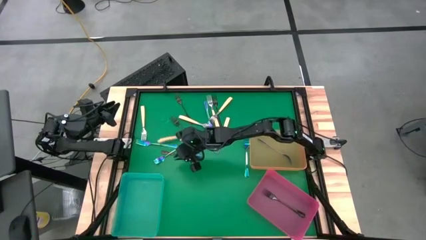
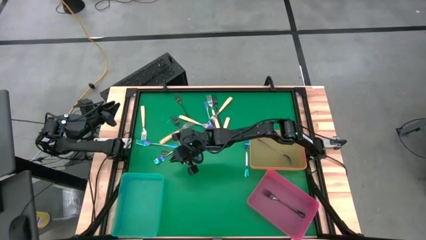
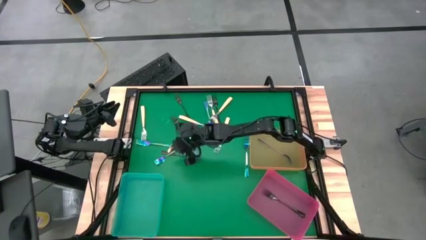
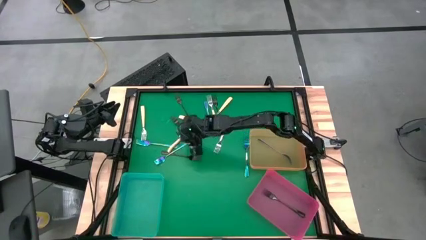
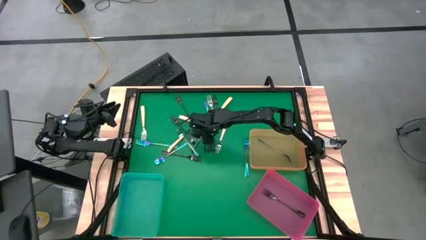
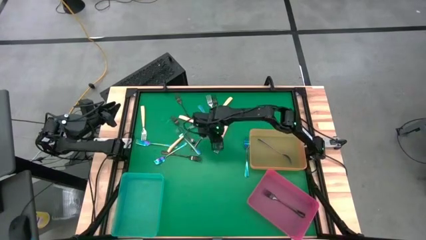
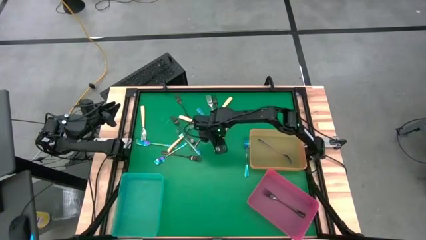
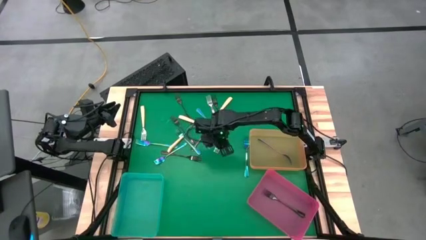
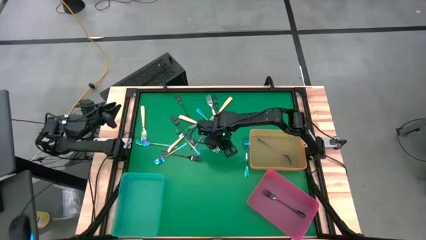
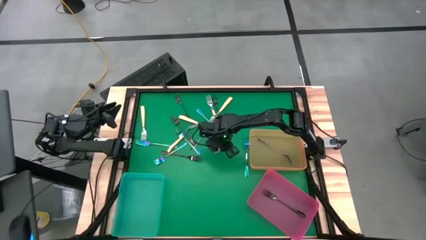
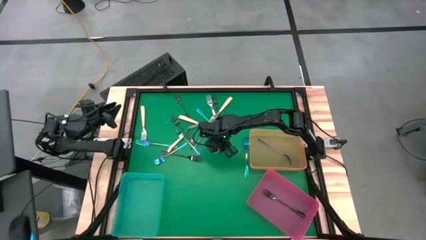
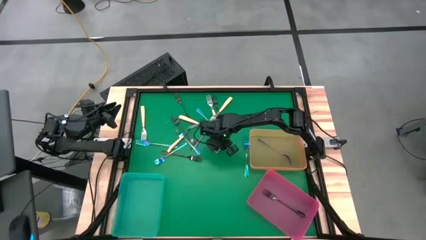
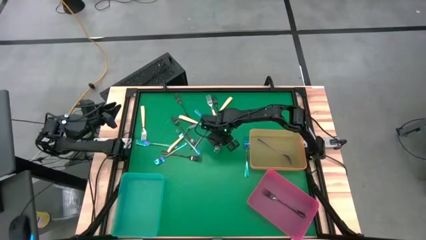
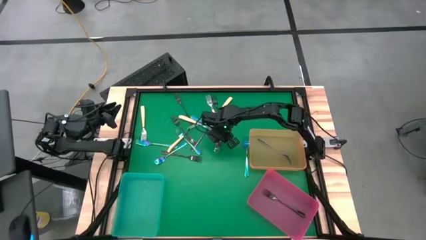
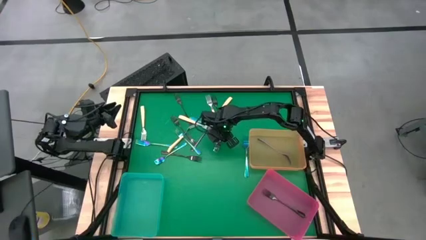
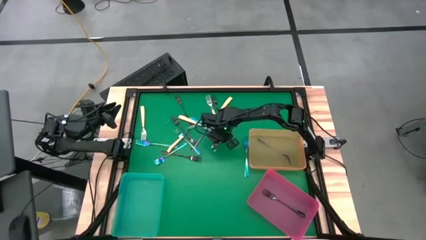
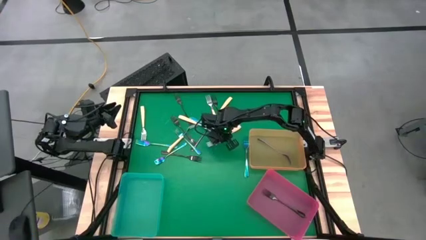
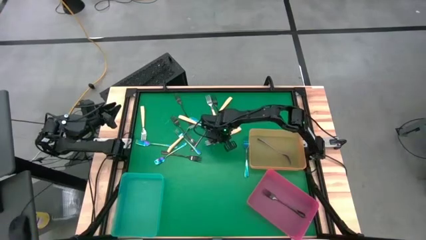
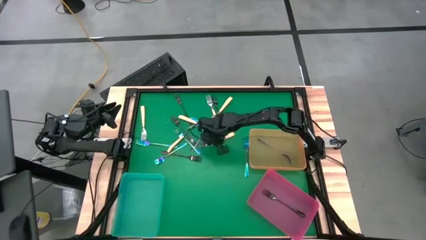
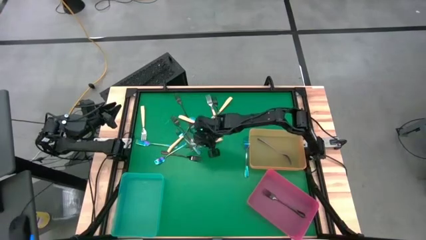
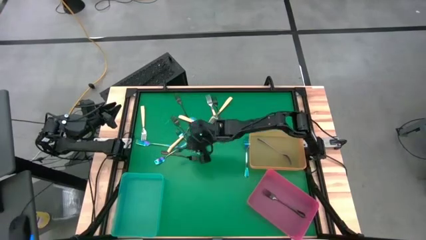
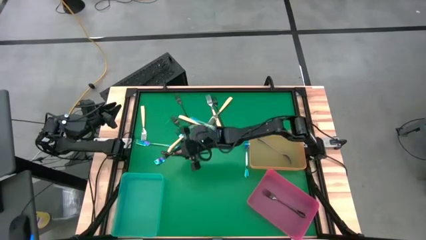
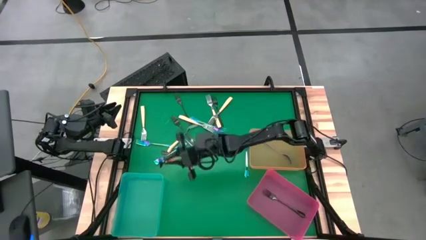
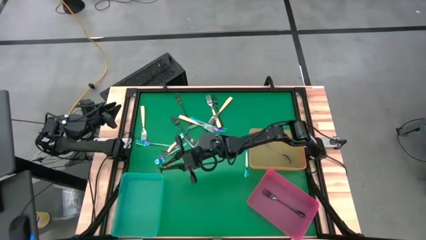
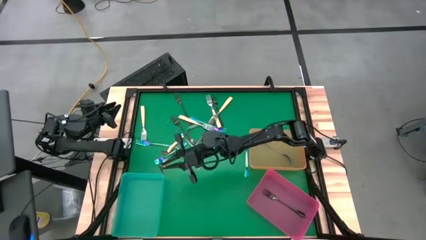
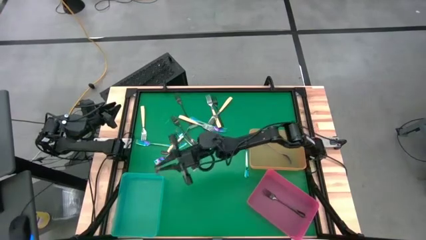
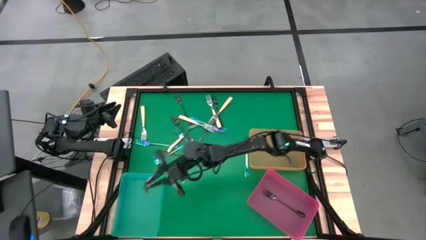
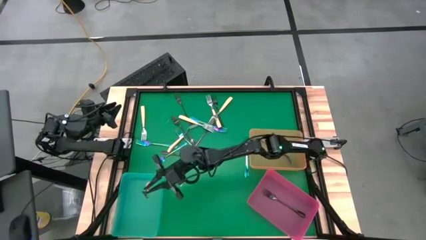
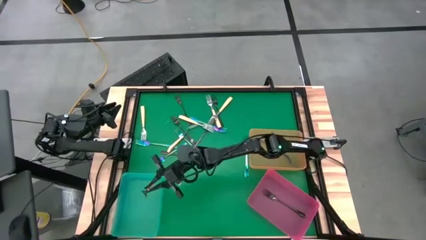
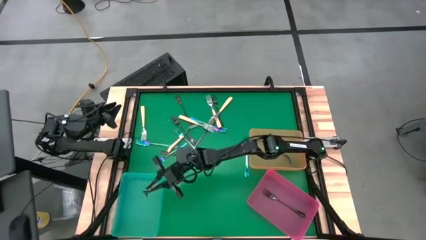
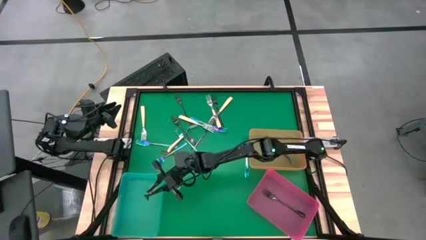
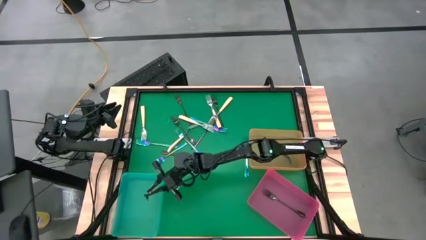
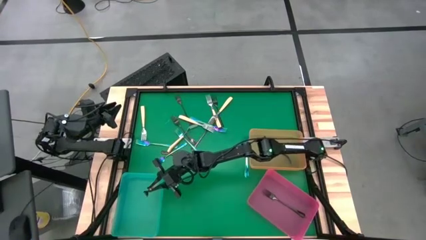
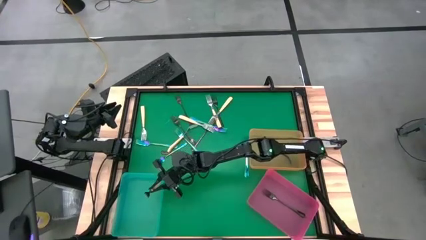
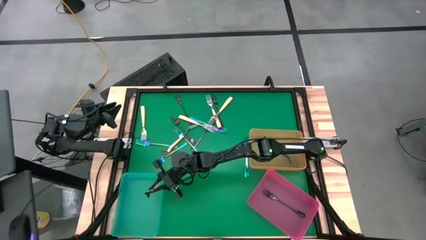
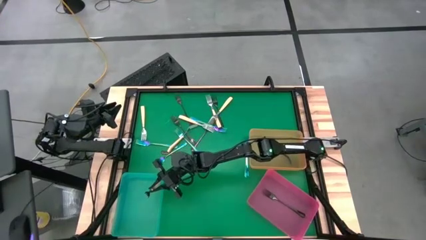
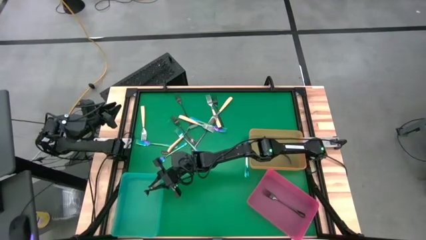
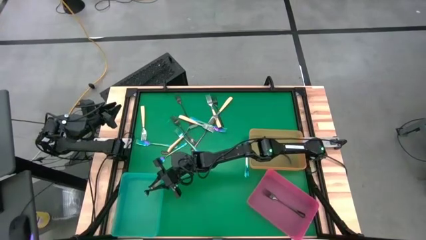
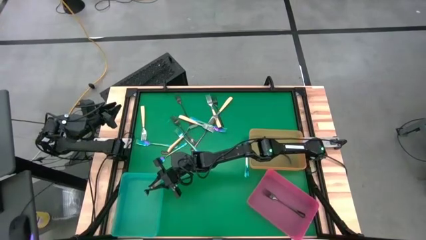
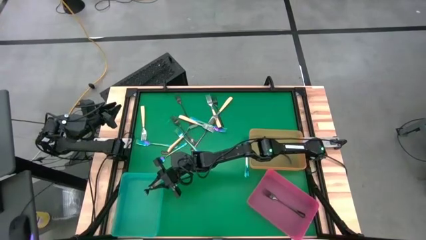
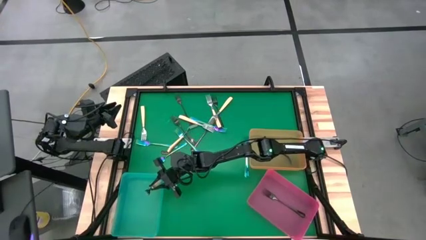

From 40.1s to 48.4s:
Task: Sort silverware by color (type)
Put the yellow fork into the blue bin

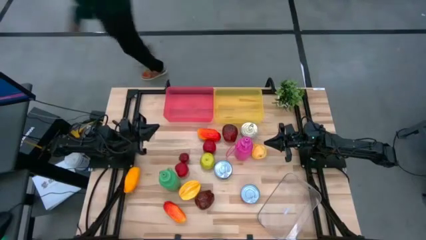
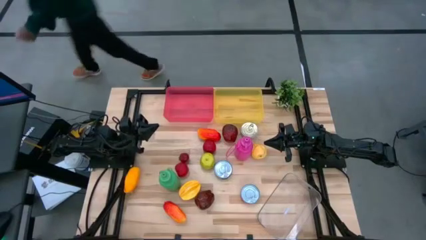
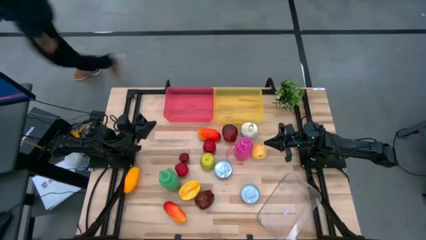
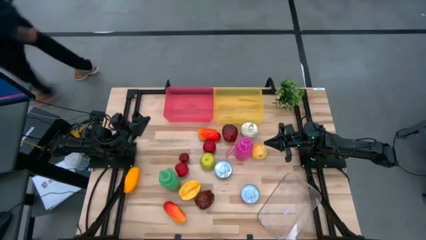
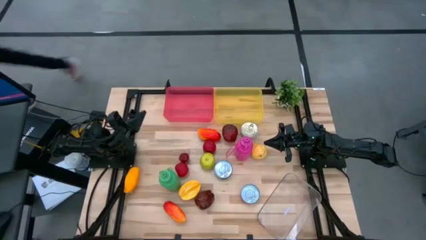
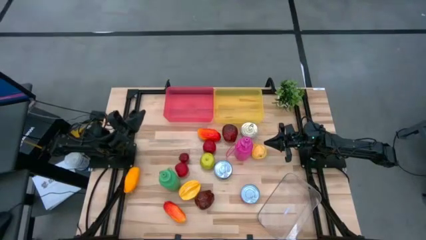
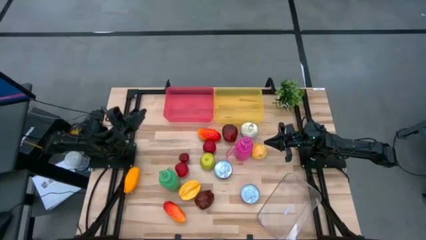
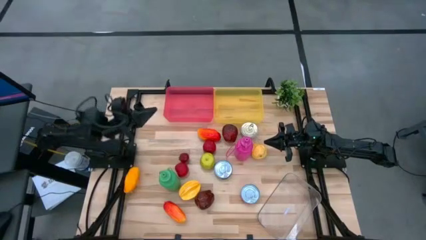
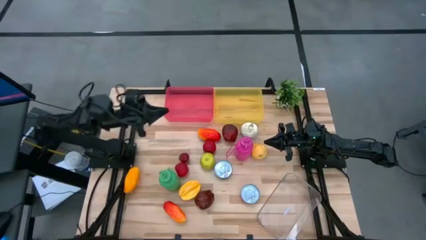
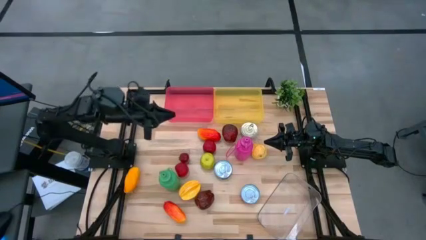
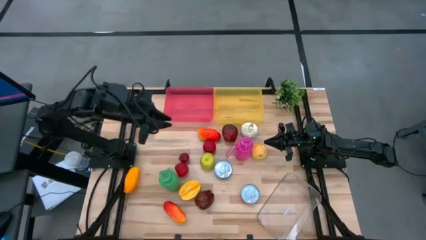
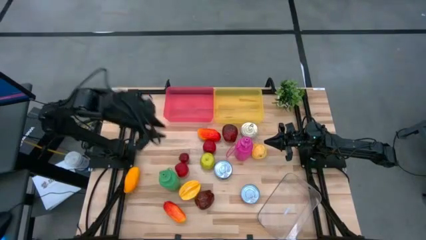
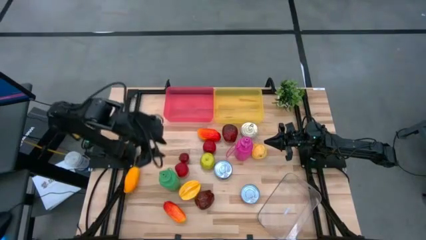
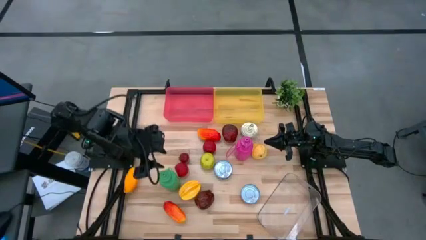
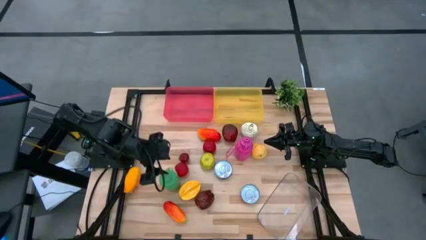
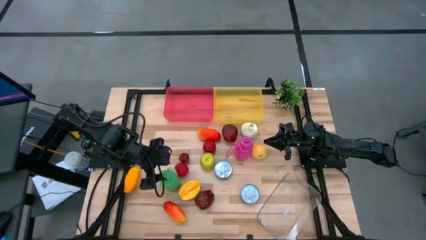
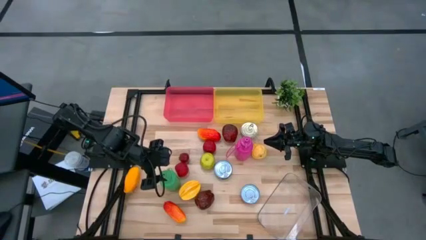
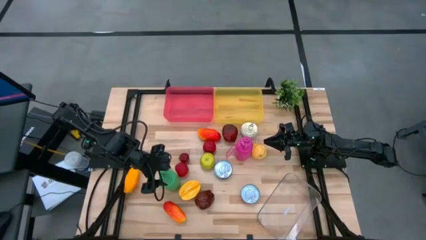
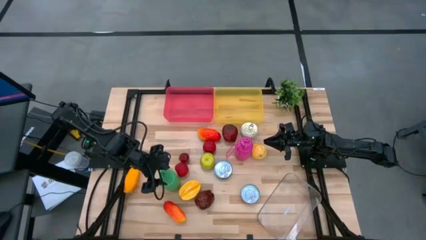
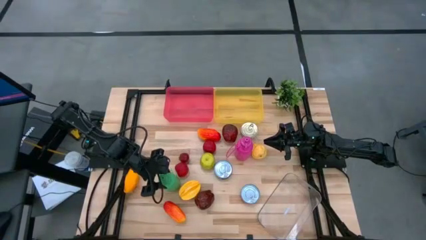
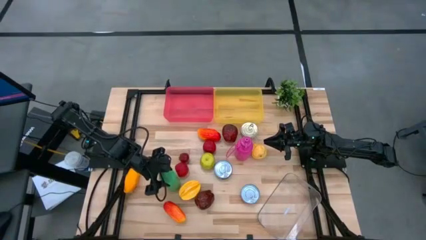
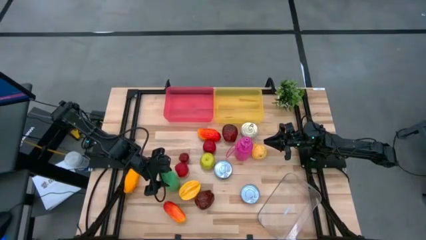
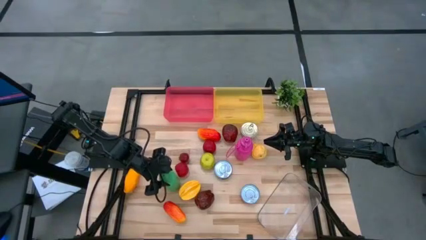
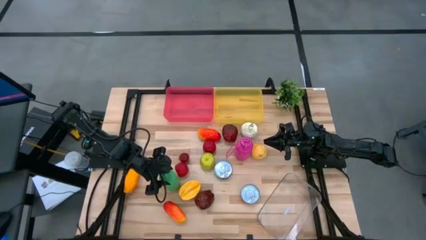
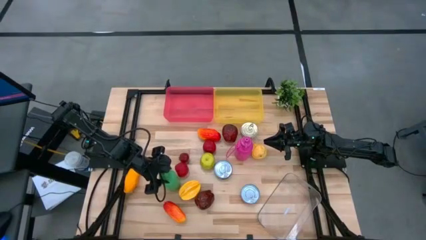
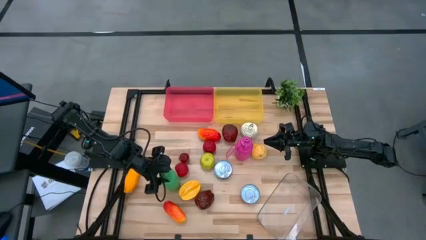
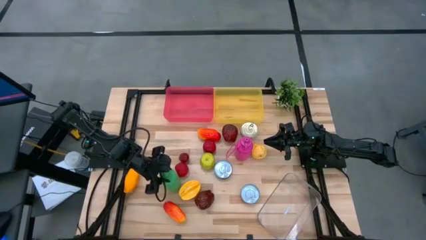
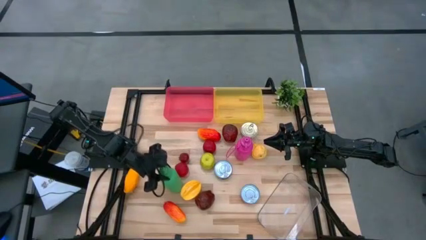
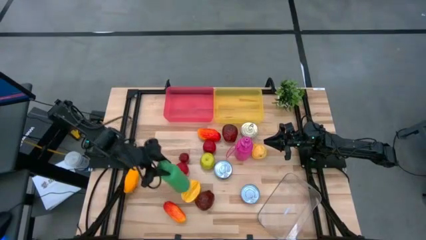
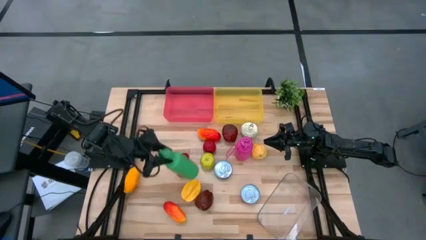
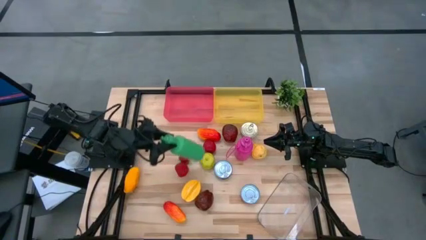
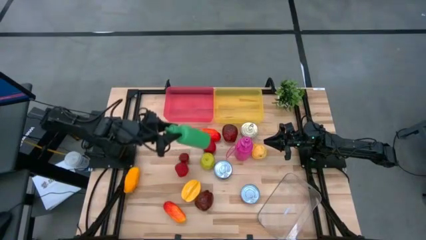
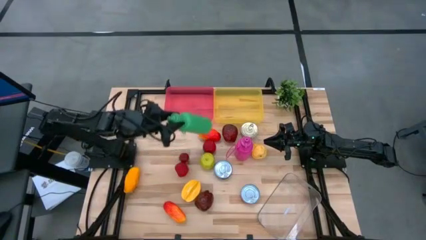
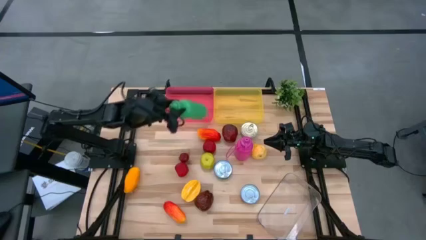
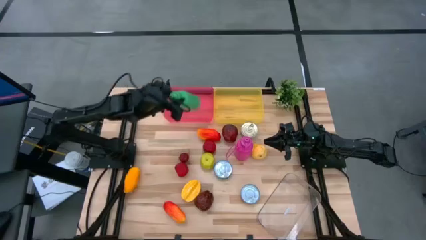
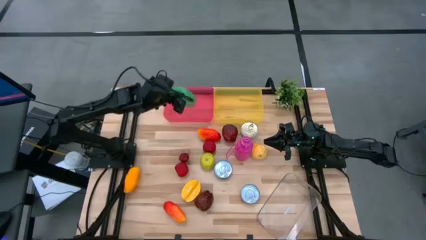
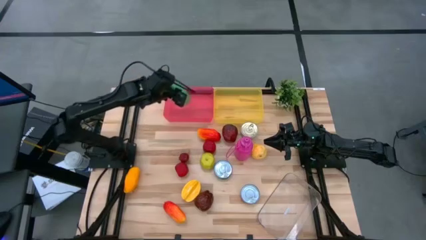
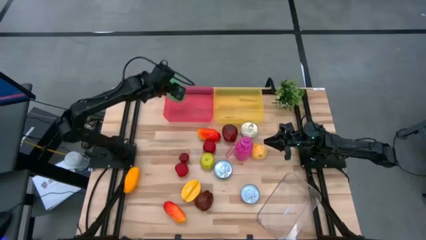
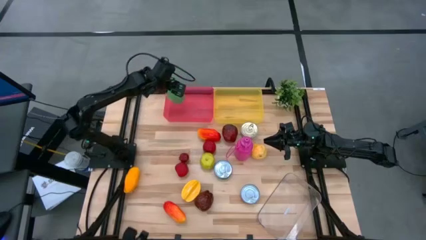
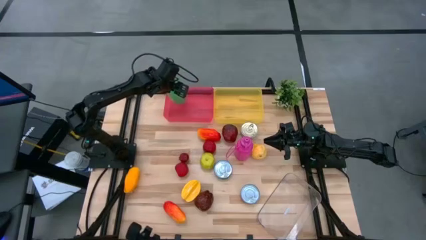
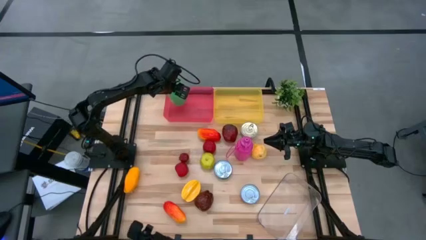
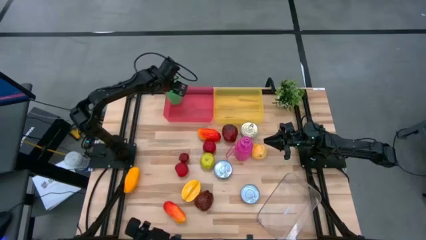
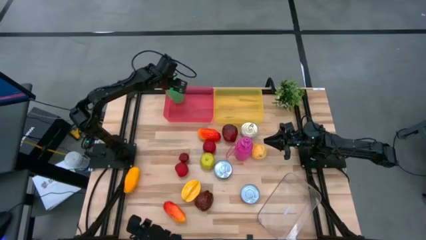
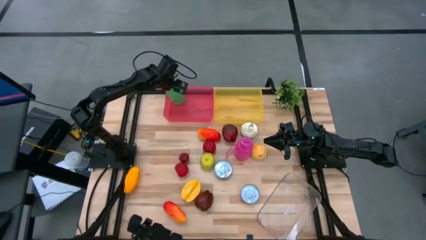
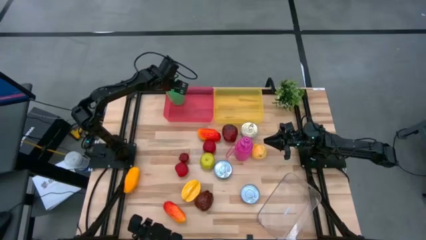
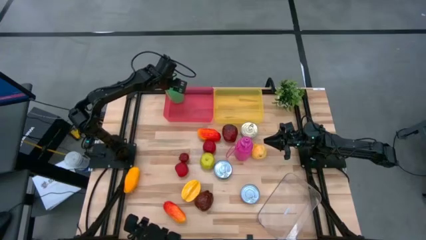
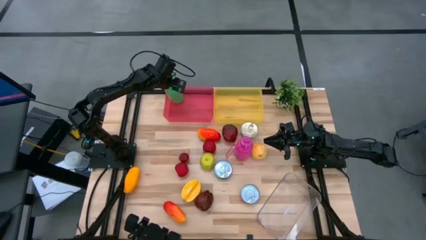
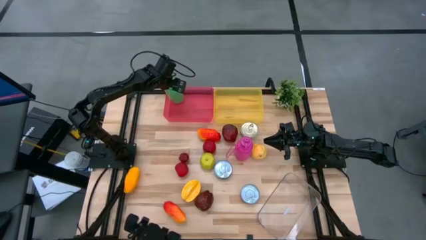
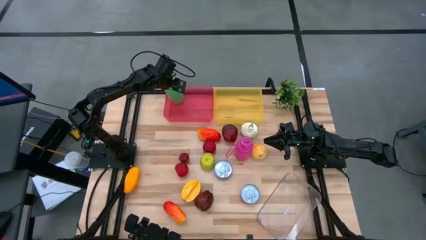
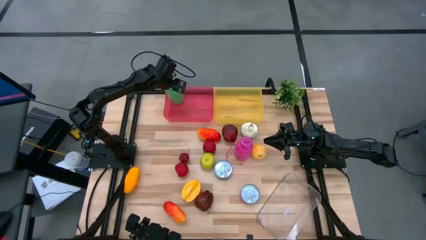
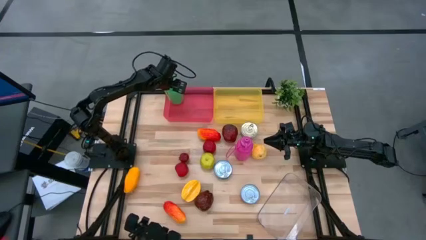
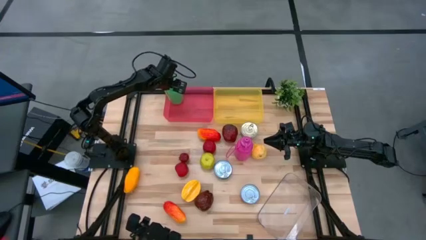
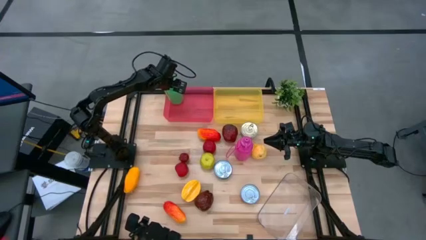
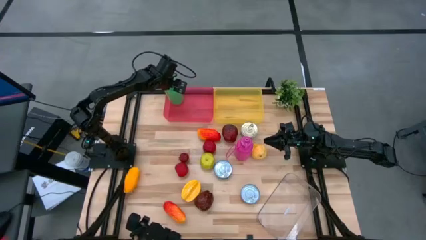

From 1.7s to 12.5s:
Task: Pick & Place Food Item
Put the green tumbler into the pink bin
